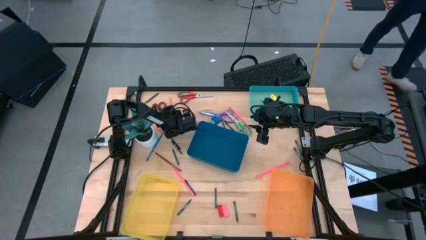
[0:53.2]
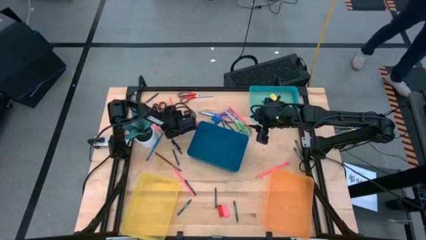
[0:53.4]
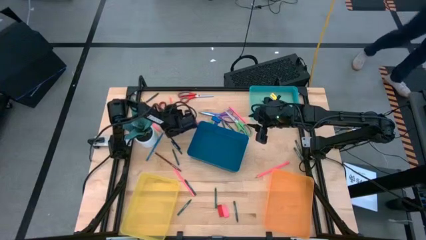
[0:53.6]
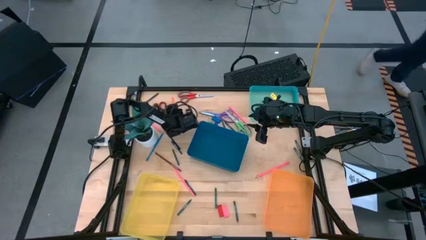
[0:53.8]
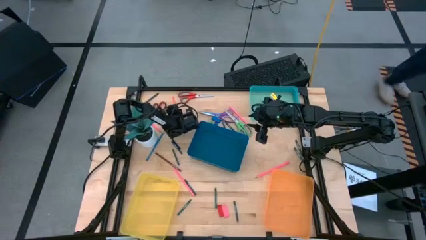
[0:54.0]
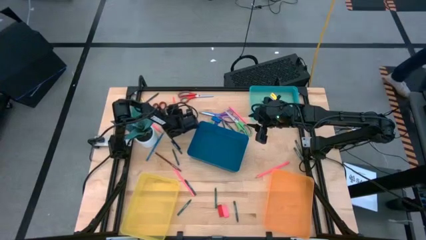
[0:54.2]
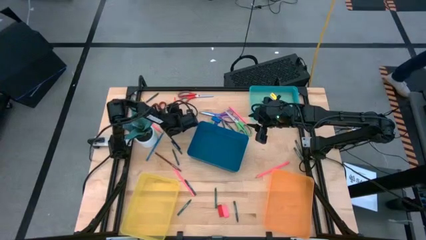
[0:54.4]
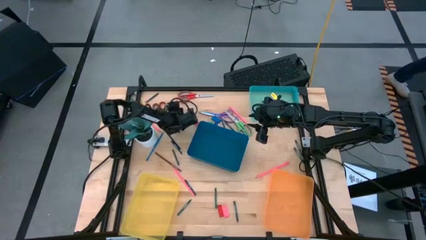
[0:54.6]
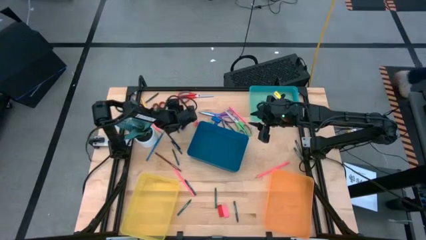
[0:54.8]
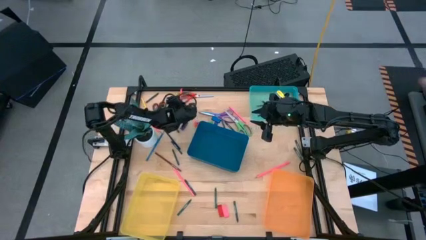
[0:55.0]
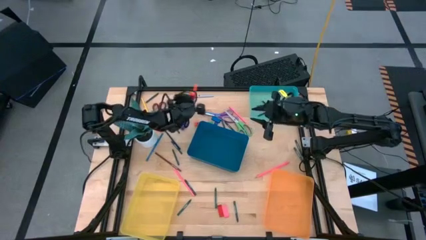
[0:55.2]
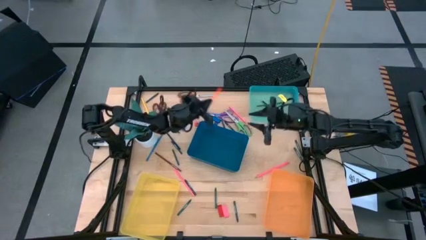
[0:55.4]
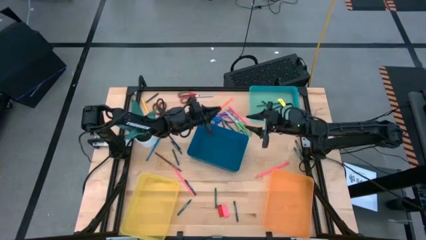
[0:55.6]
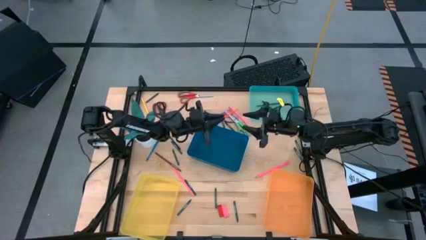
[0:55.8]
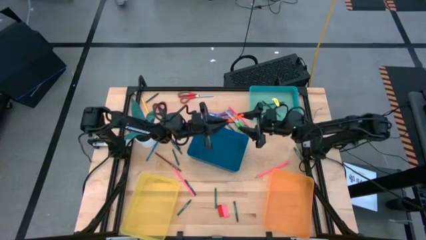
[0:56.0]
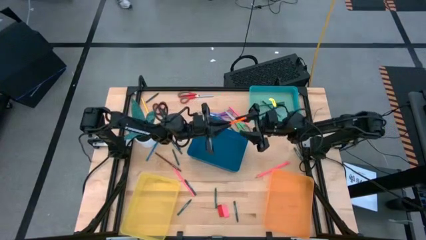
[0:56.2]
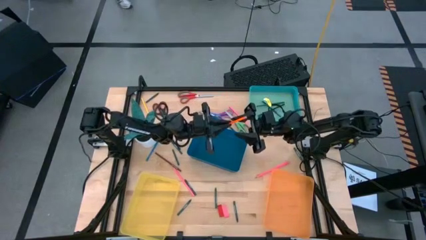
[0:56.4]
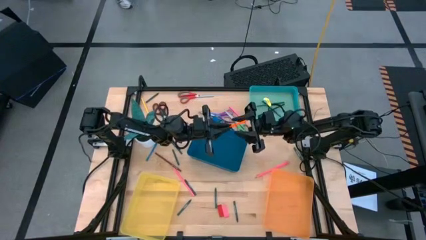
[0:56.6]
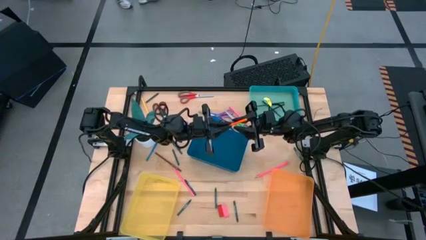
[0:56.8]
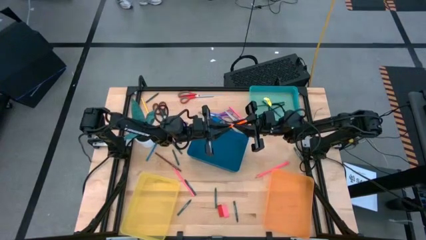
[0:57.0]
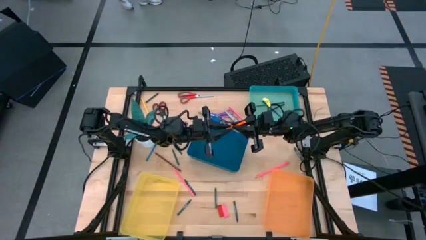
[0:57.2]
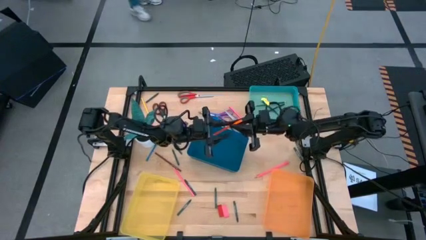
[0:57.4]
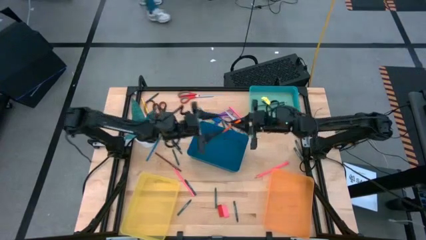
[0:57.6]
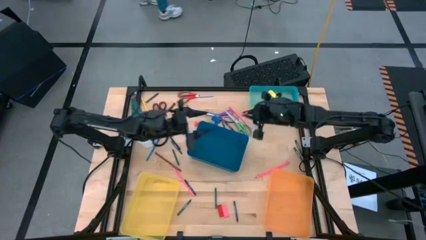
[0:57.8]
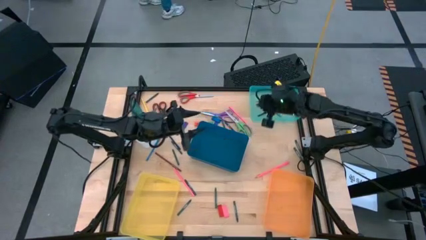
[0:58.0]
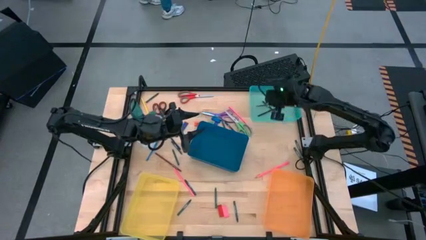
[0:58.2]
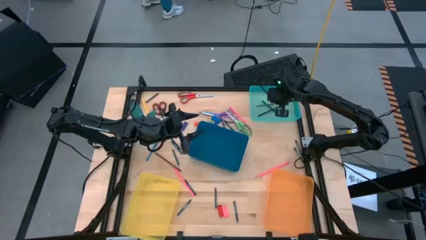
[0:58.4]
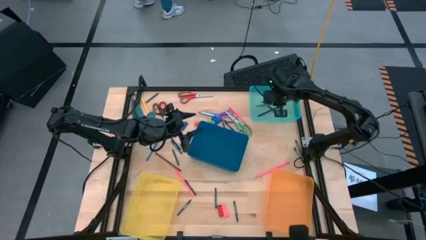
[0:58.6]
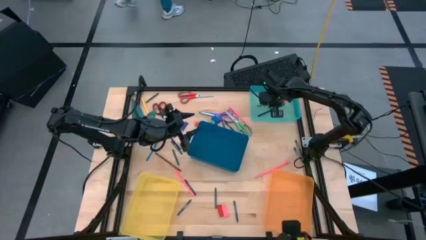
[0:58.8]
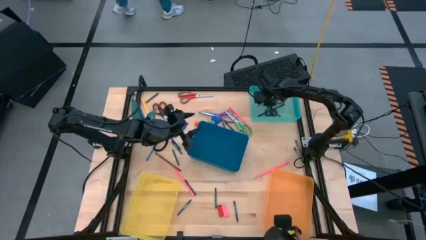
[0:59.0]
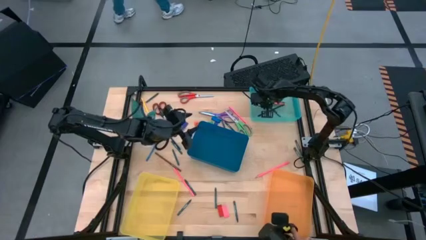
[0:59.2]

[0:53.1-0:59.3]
Task: Sort crayons/erasers/pens/pencils in bins
Put the orange pencil into the green bin

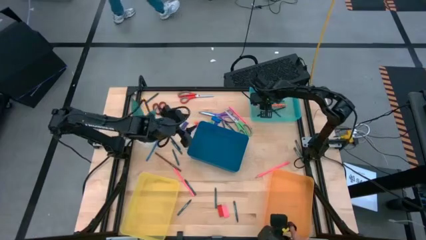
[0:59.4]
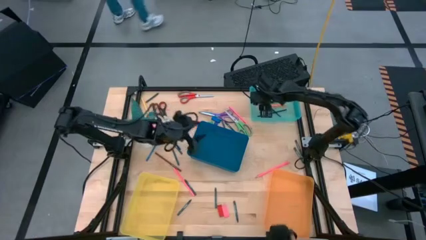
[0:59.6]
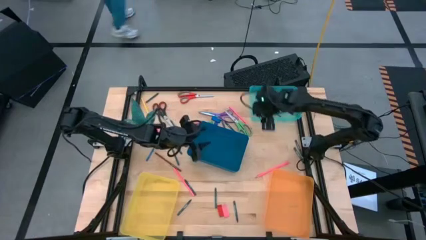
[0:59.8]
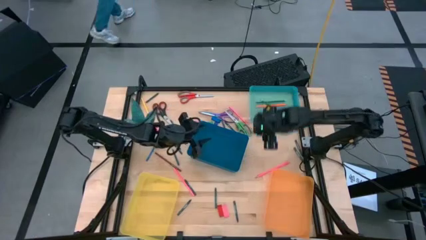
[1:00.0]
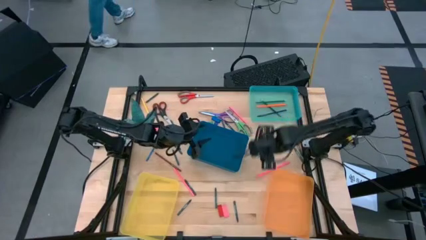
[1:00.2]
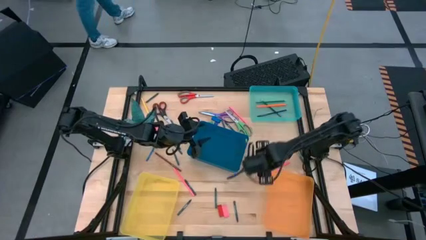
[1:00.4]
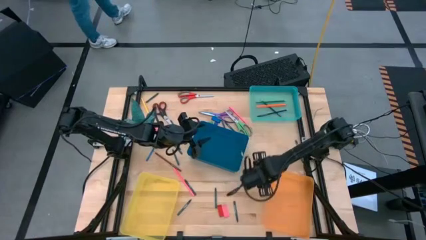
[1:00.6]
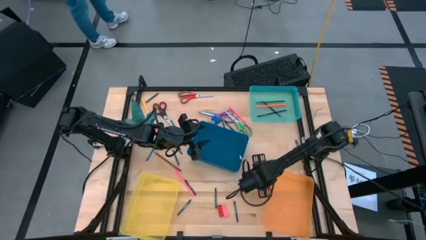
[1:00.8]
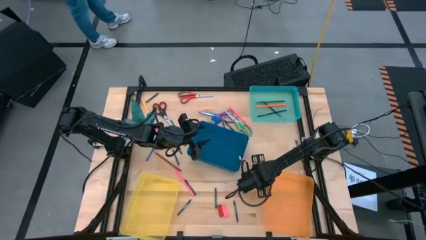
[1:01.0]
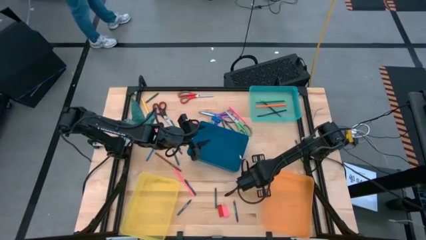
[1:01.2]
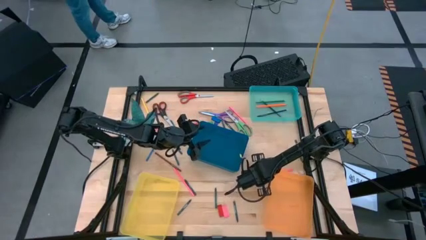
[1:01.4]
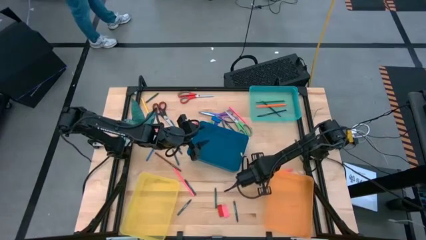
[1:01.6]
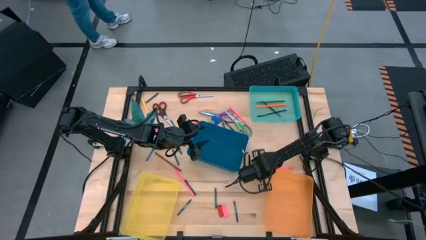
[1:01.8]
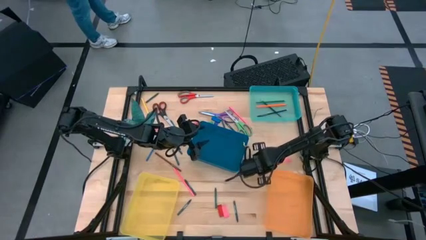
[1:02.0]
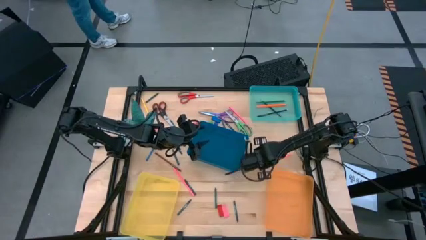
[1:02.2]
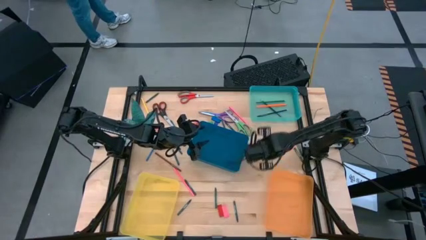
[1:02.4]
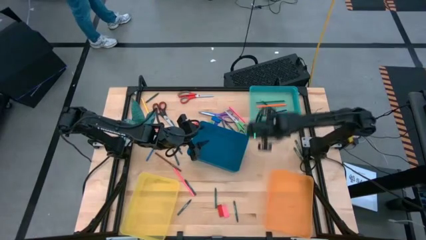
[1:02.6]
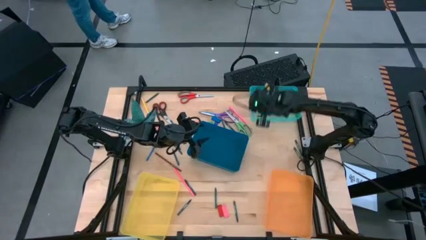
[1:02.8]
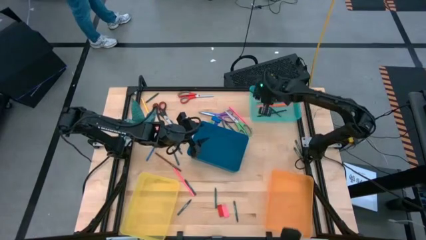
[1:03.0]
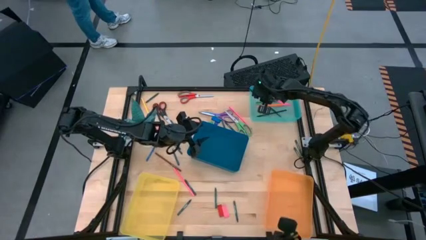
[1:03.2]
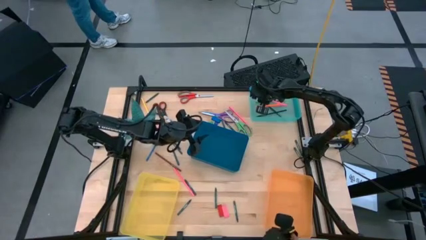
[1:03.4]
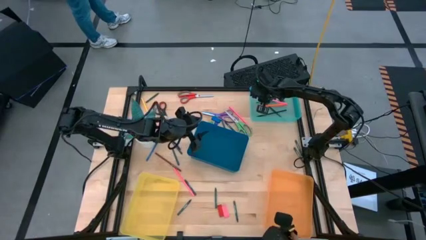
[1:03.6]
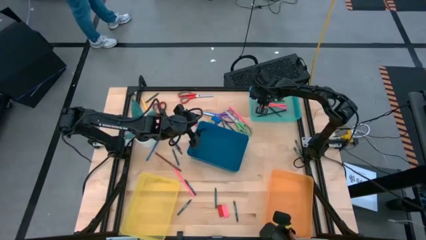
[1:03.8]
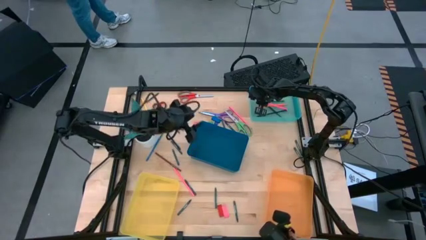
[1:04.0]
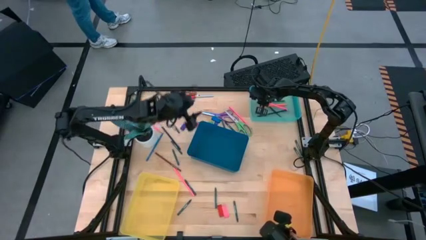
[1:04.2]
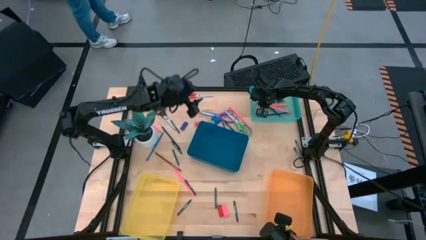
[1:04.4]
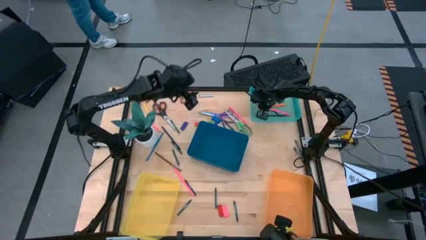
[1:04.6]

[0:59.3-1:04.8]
Put the pink pencil into the green bin

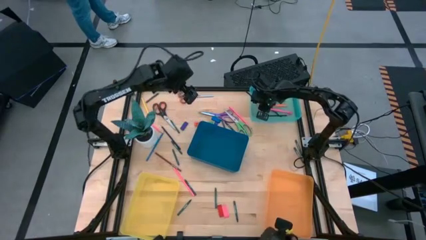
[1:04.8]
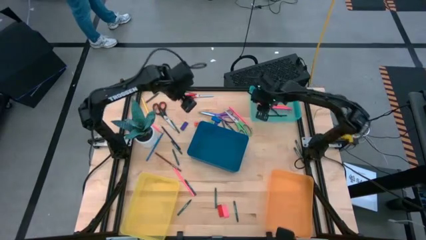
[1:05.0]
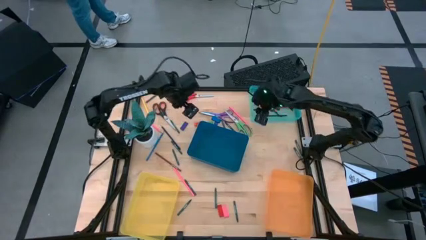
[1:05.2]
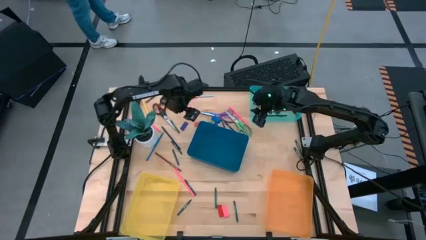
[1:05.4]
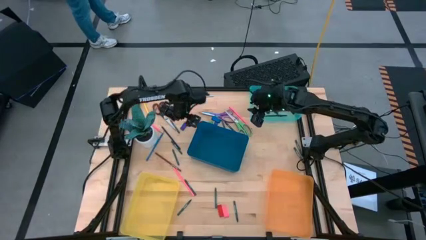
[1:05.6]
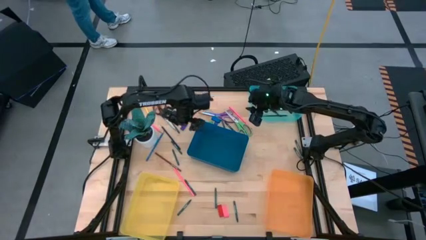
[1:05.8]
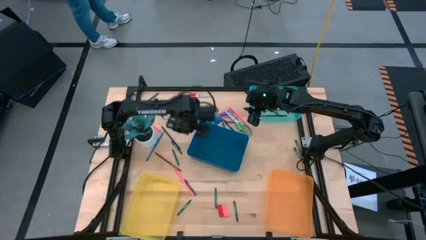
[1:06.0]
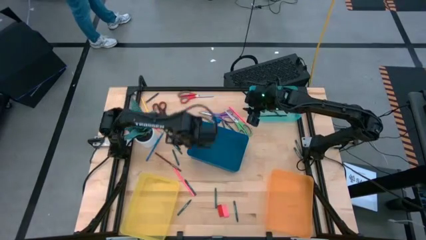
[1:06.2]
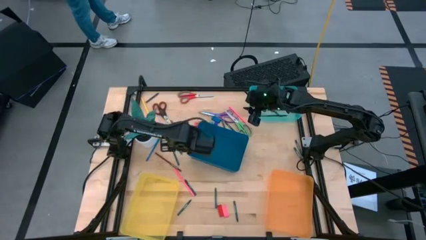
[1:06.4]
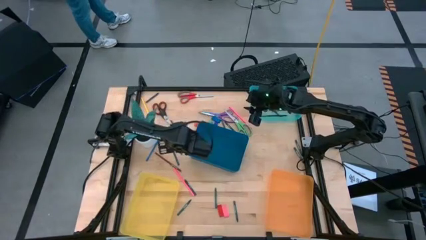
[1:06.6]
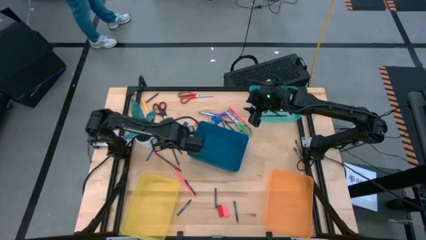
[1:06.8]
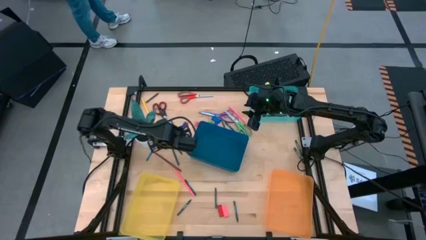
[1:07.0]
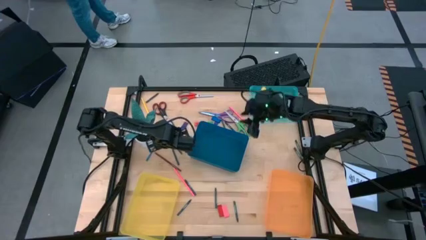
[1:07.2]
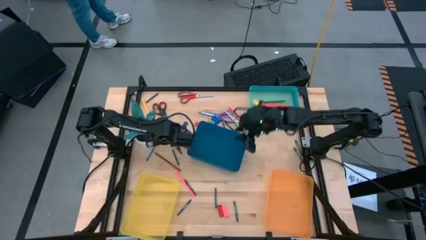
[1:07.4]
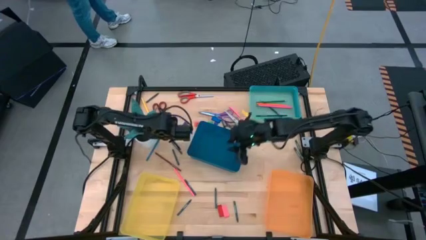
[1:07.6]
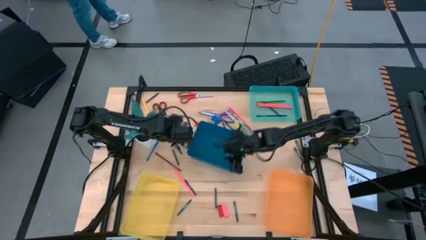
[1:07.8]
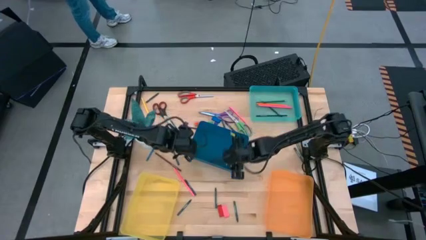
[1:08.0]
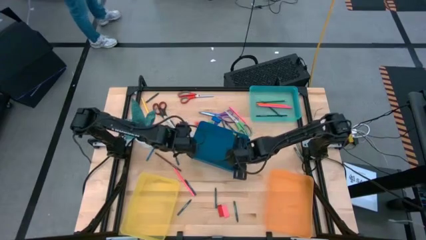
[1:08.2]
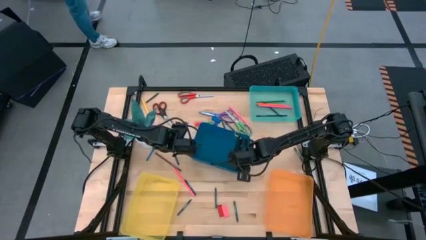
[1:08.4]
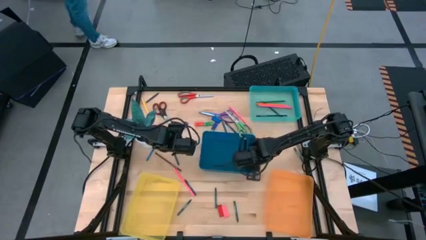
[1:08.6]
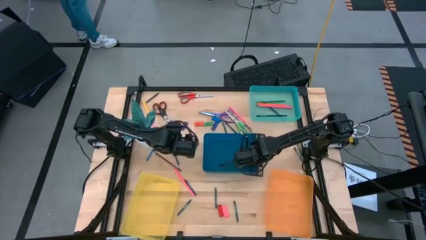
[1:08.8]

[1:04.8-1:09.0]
Adjust the blue bin

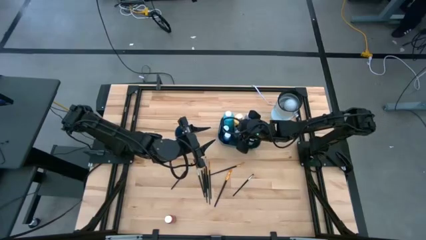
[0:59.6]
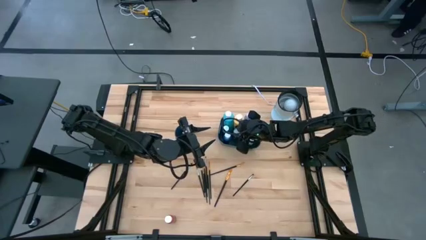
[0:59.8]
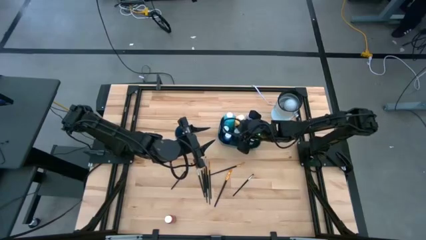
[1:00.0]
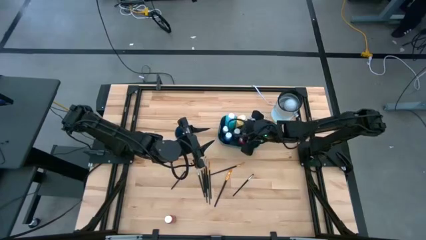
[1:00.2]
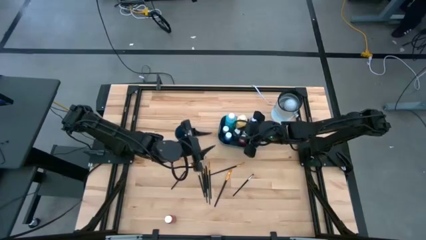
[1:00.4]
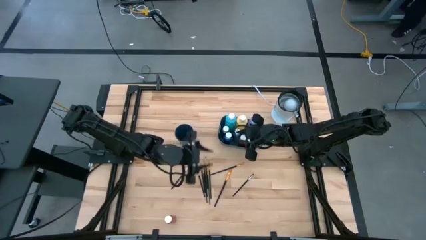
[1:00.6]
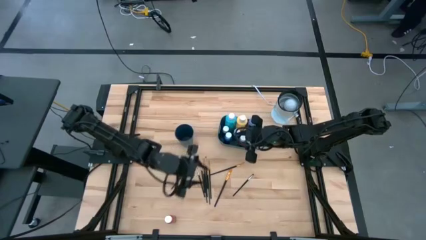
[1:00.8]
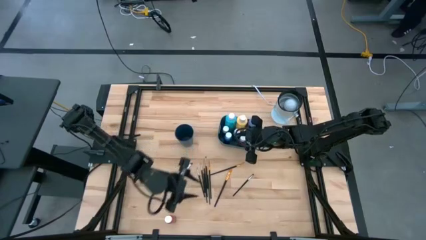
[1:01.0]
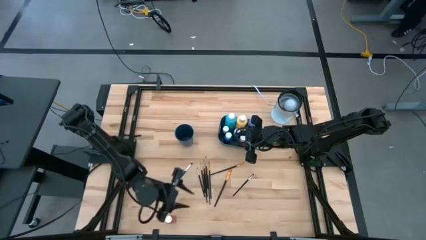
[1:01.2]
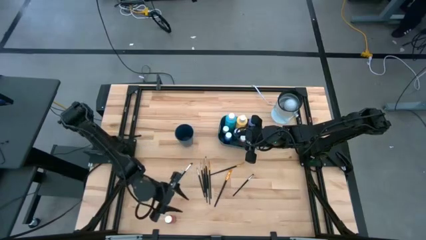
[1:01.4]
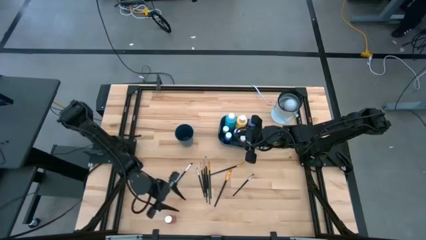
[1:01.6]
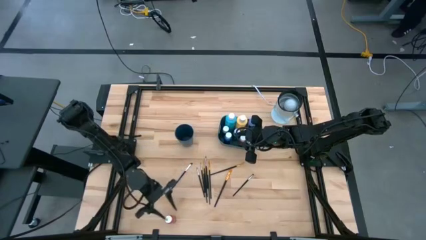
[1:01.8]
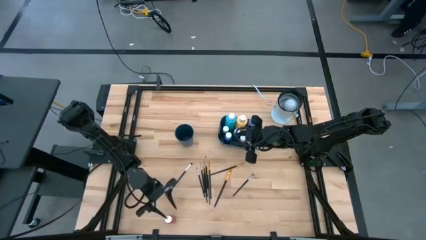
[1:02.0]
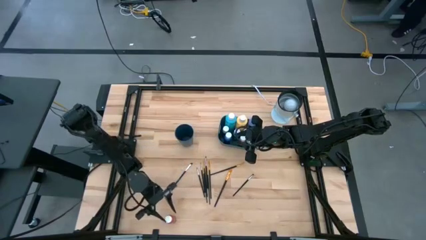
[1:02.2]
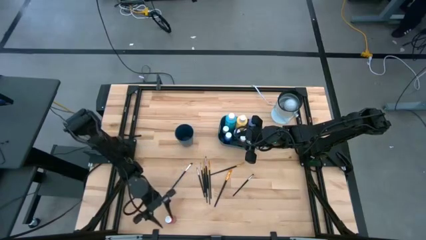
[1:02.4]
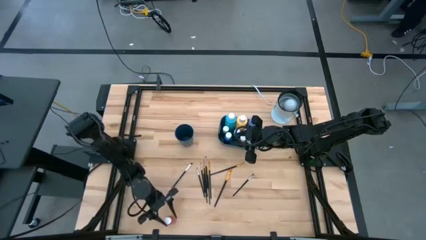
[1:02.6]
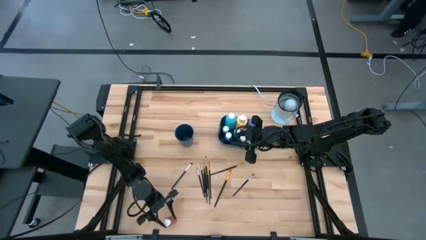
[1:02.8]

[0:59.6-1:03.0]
Task: Pick & Place Paint Supplies
Put the small red paint bottle into the blue bin
